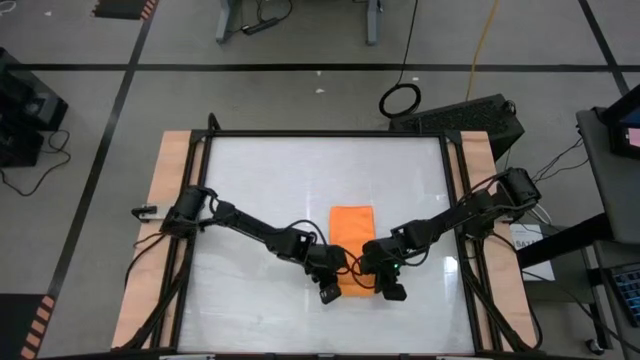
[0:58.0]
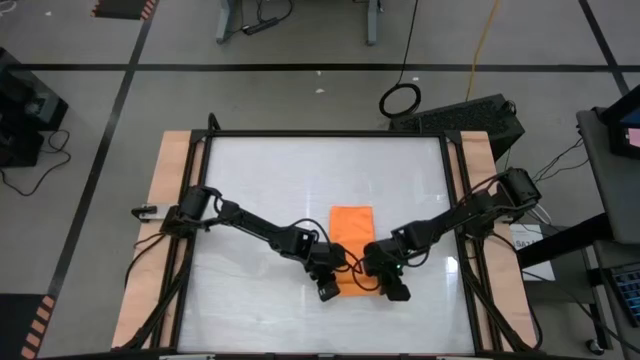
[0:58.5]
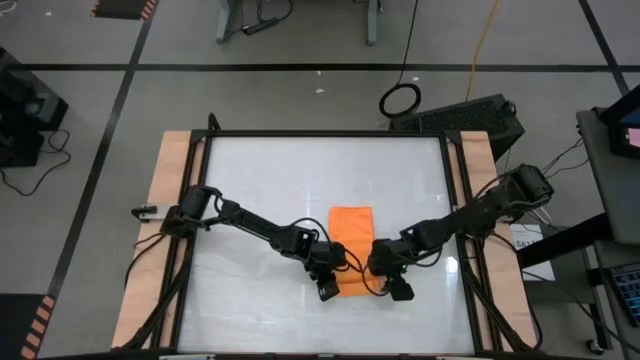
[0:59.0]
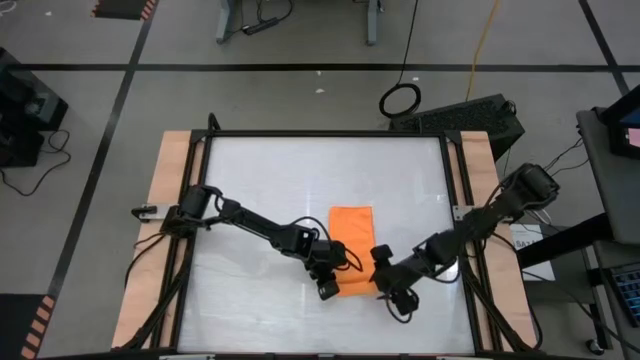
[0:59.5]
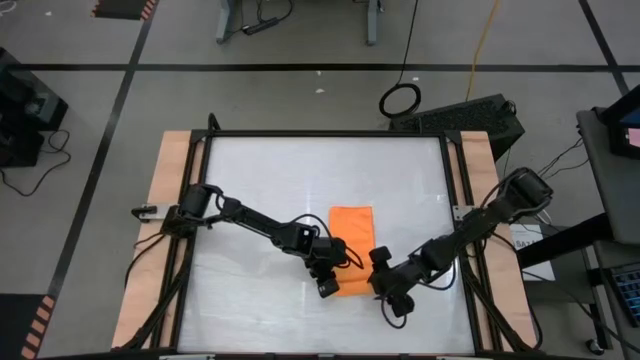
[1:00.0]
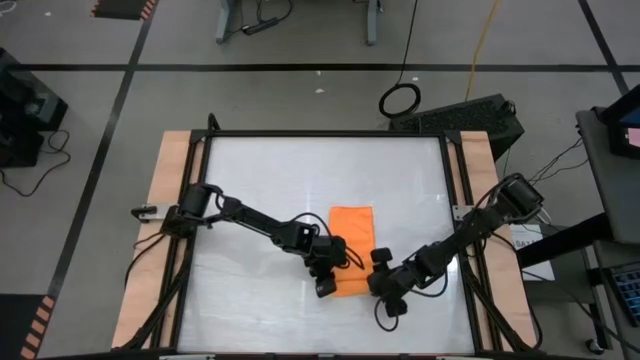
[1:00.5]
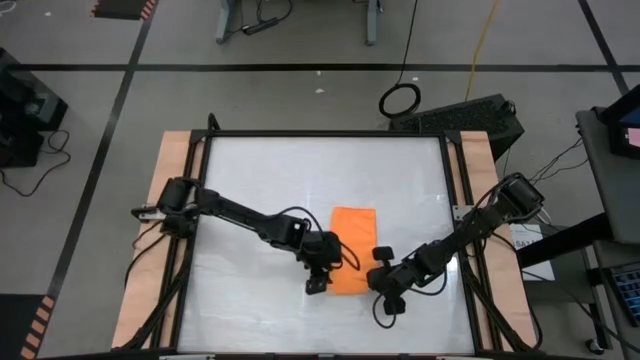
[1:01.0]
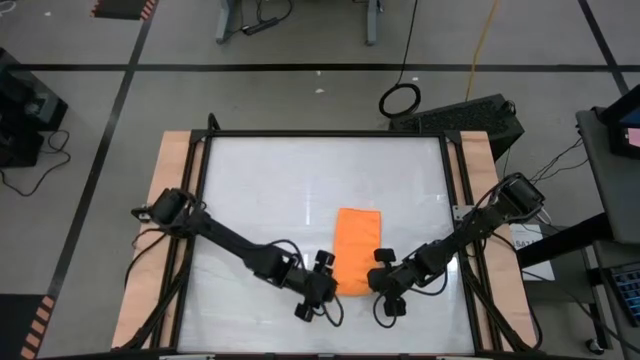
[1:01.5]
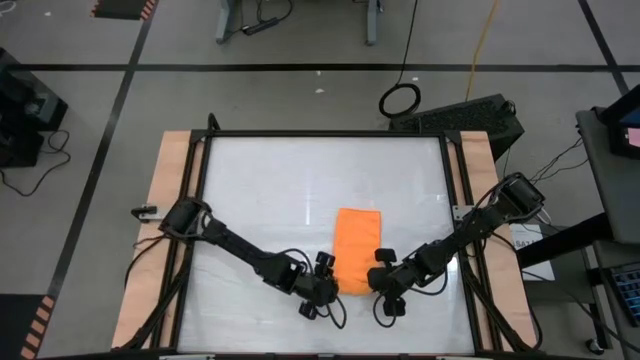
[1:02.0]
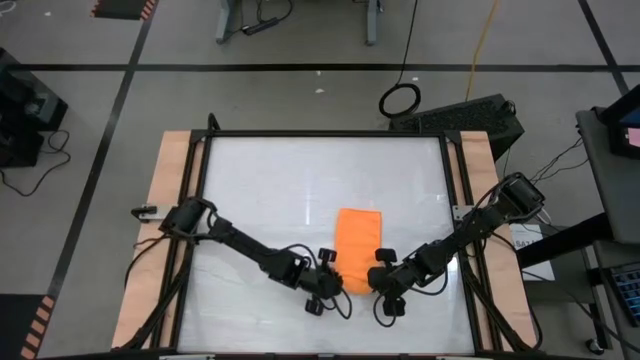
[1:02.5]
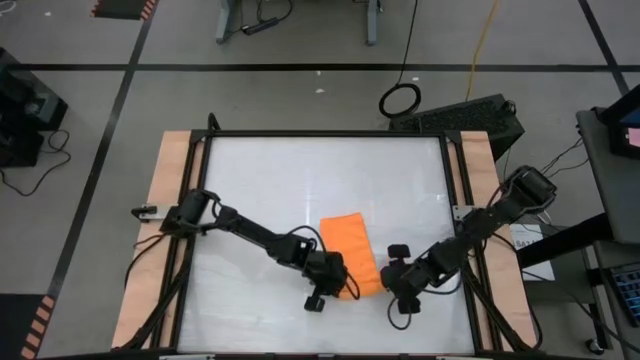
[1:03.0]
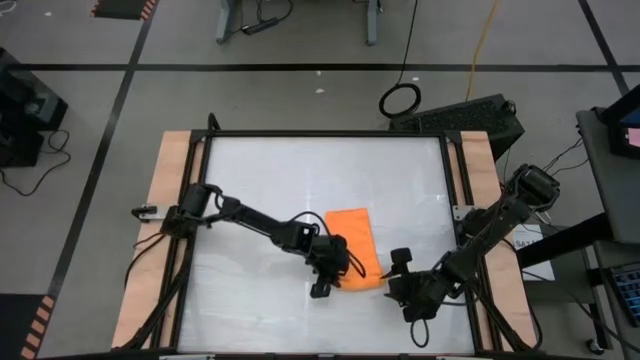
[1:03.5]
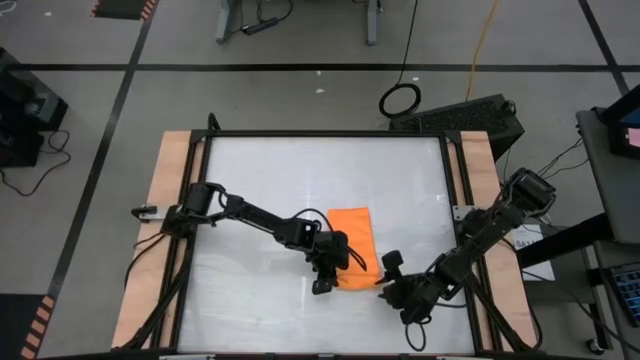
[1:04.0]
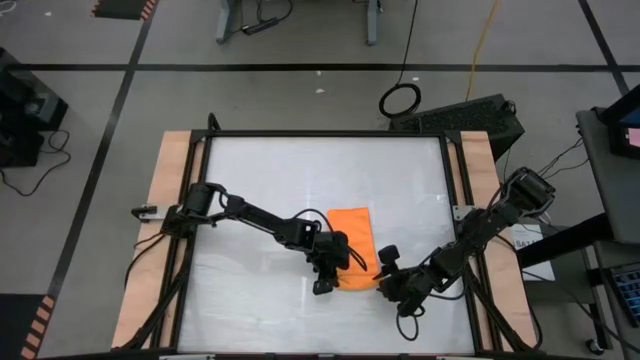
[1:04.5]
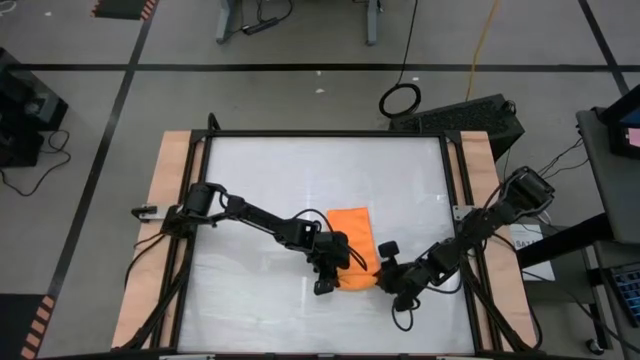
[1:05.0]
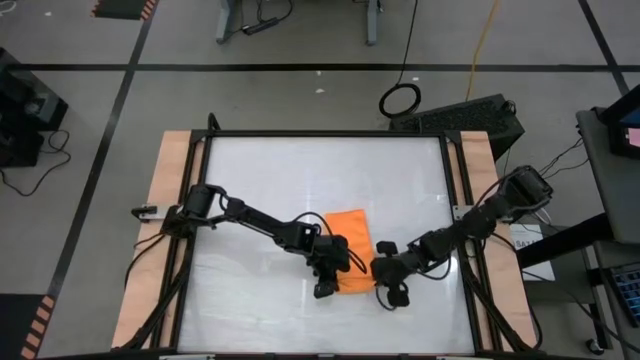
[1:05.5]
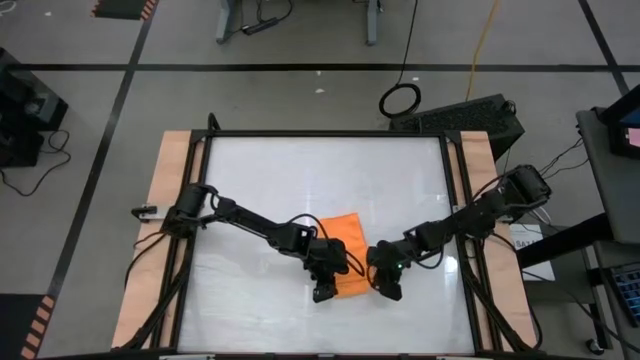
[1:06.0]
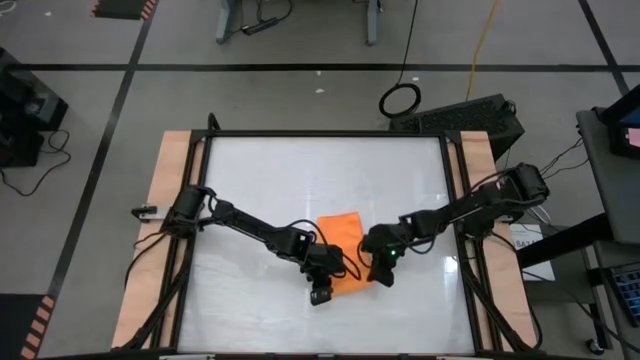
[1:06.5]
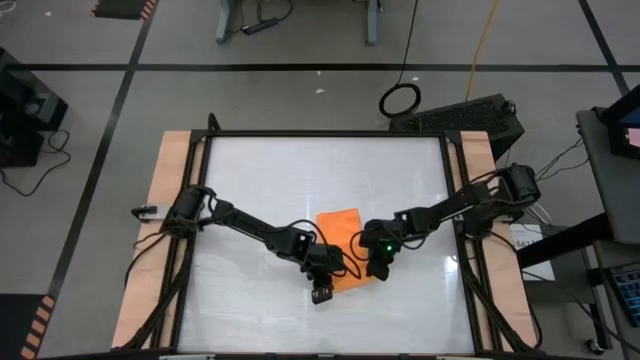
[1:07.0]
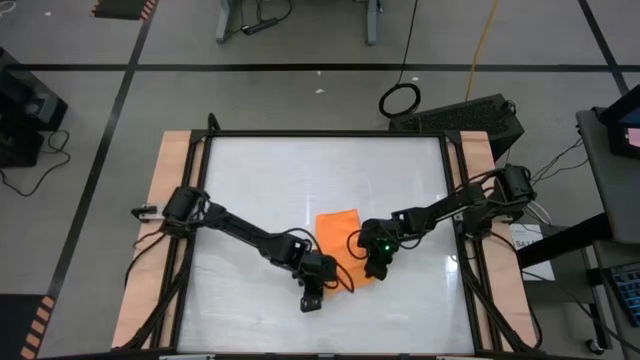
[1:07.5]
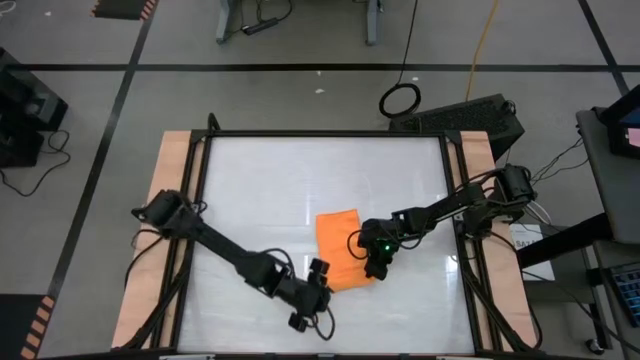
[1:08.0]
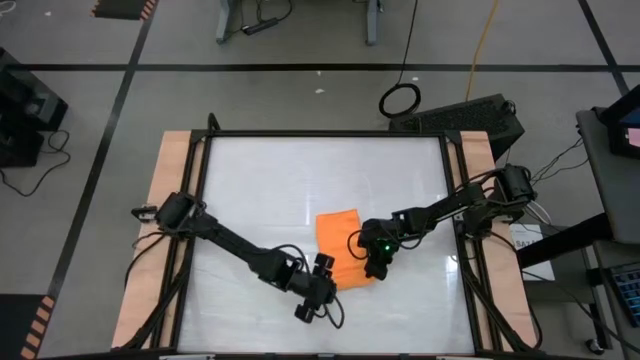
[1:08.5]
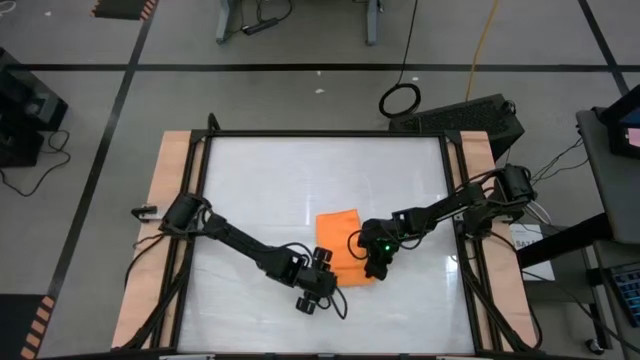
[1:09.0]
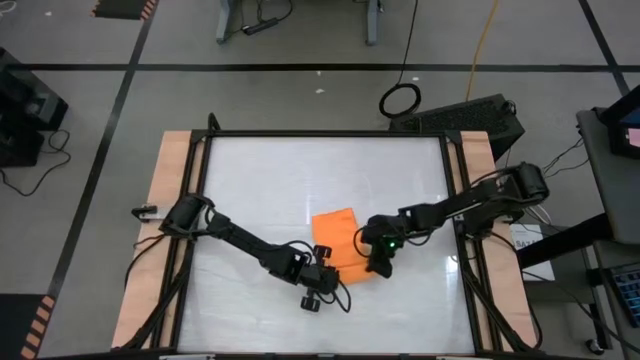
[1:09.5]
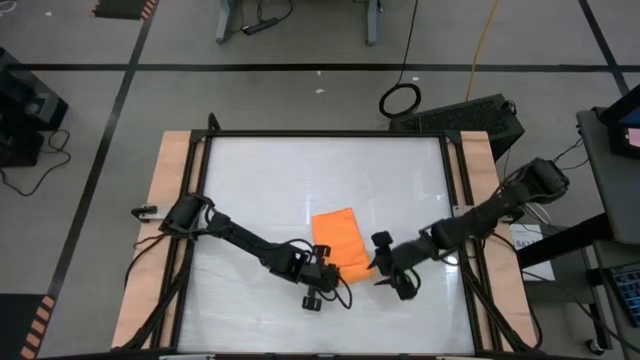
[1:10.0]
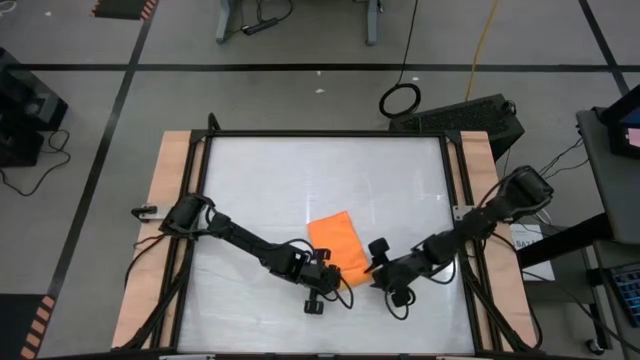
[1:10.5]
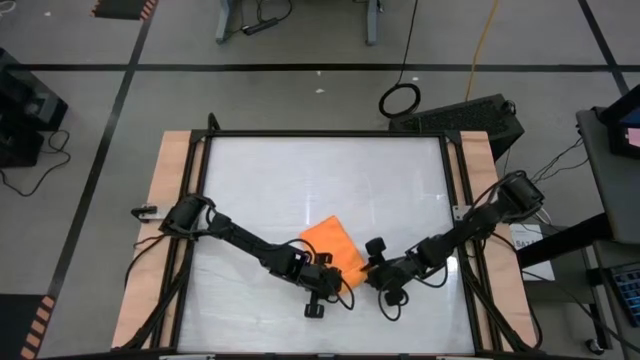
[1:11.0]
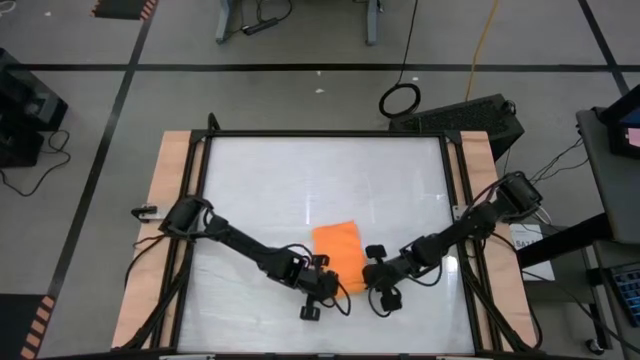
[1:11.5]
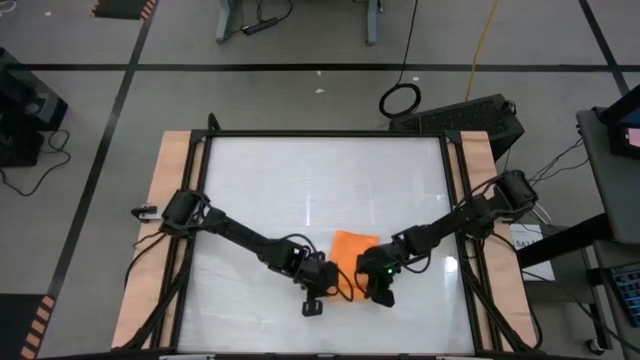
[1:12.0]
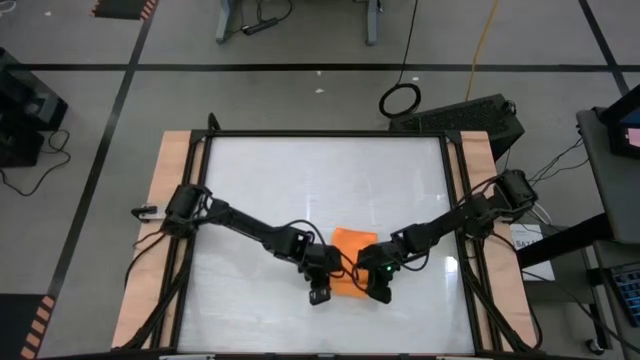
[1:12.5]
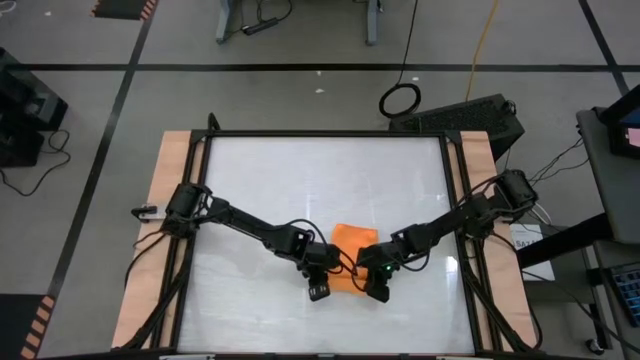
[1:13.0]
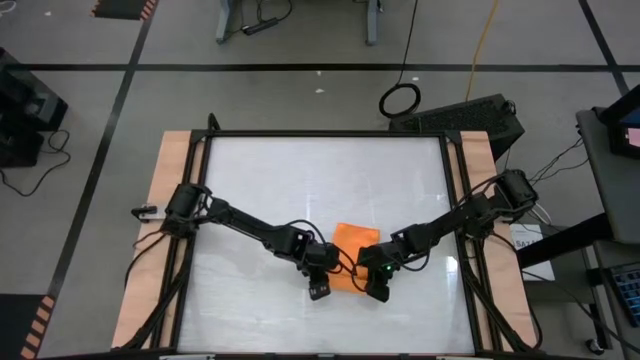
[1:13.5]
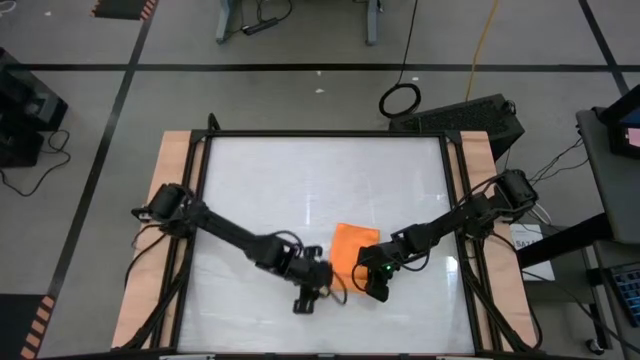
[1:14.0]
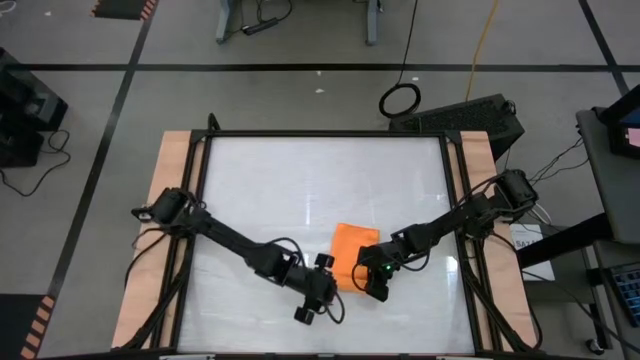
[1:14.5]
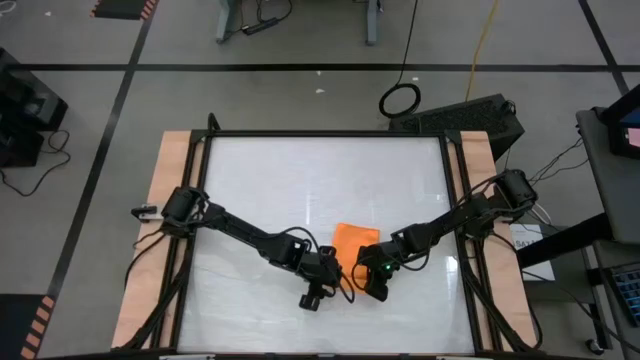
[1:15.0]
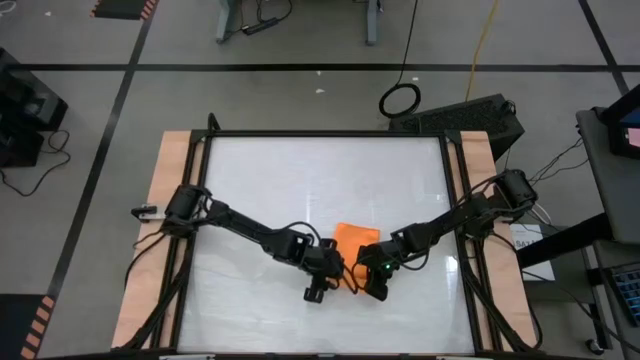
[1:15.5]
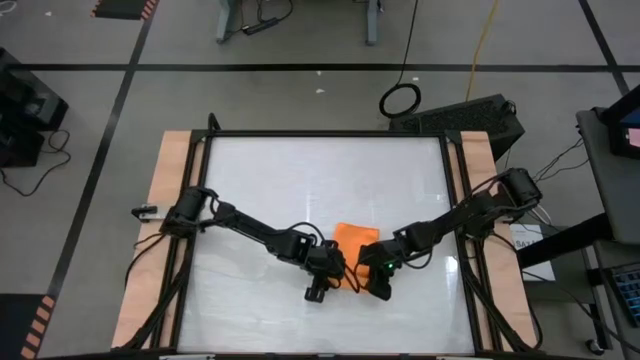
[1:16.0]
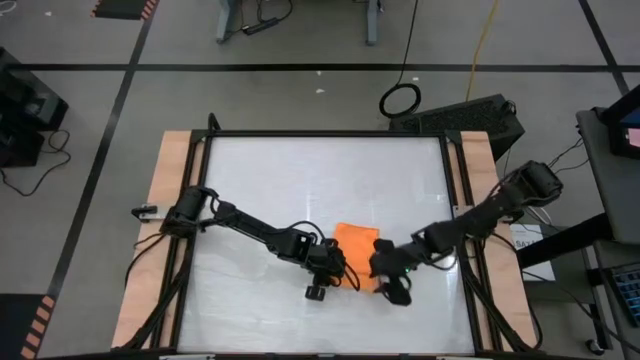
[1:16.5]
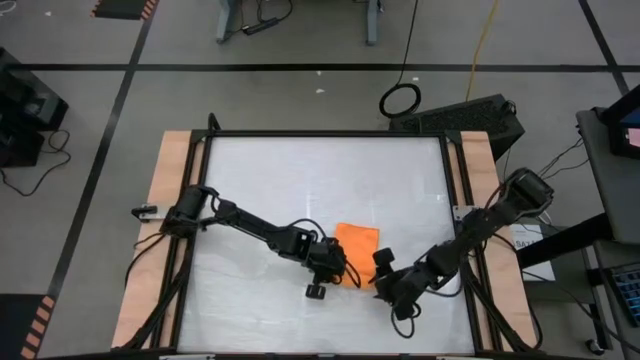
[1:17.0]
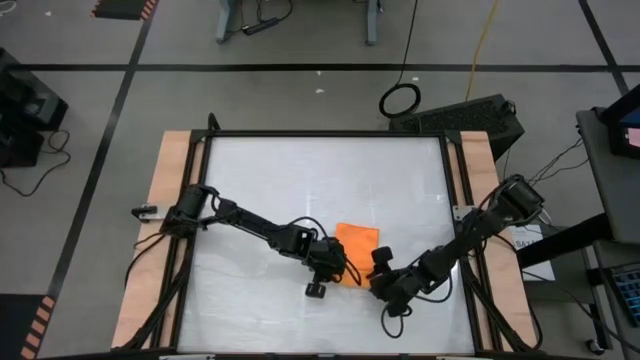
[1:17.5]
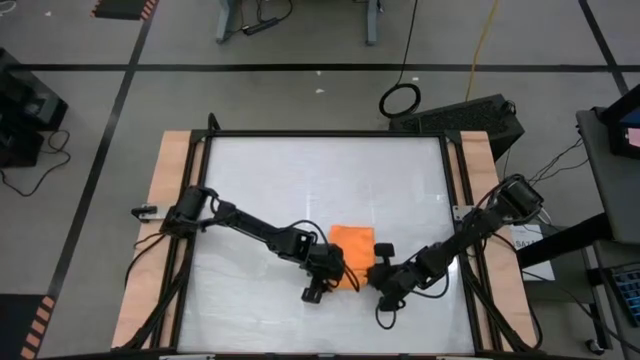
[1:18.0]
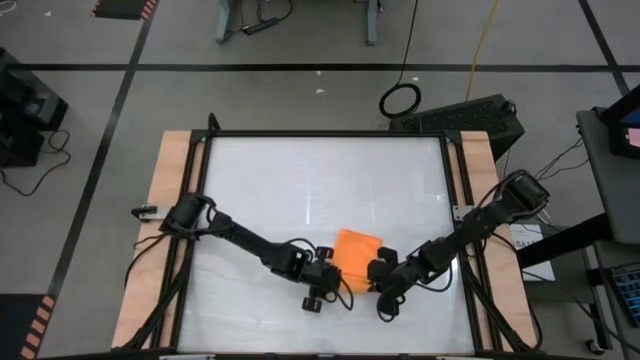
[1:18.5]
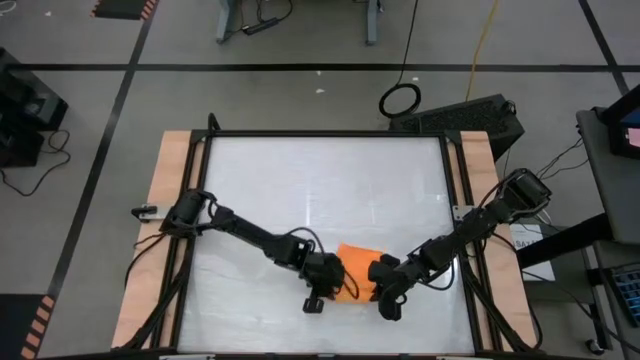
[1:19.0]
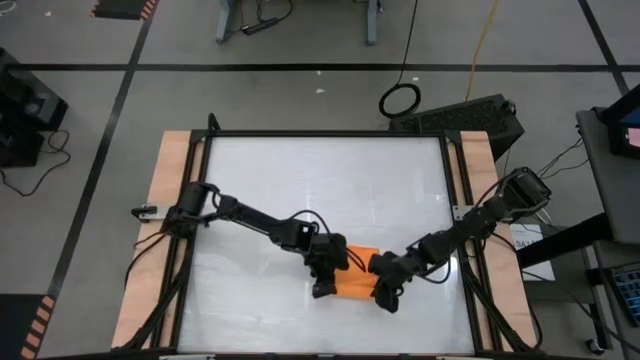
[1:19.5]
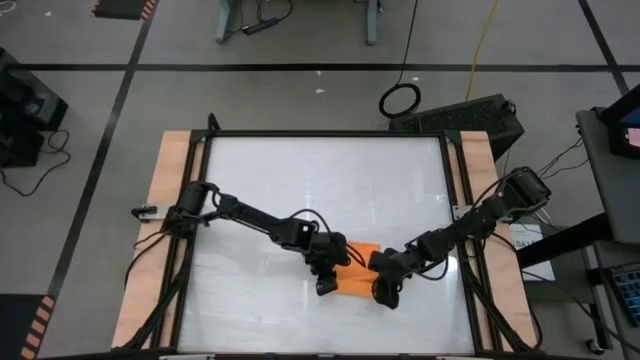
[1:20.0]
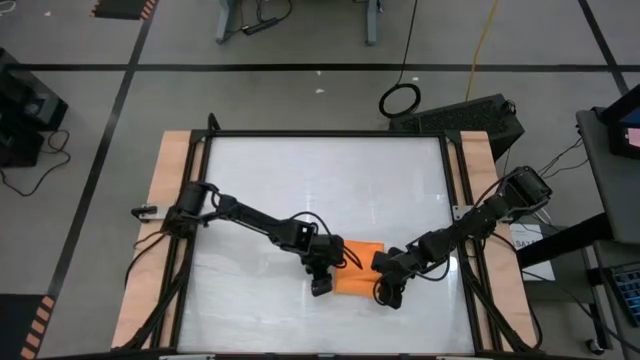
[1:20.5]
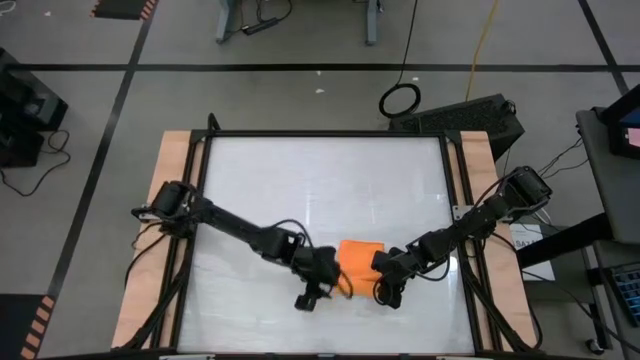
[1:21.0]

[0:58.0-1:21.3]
Task: Roll towel
Roll the orange microfiber cloth
